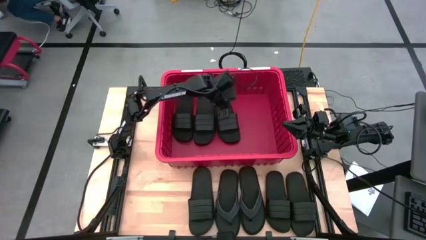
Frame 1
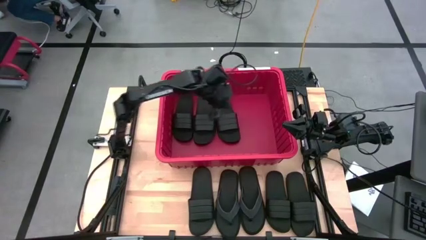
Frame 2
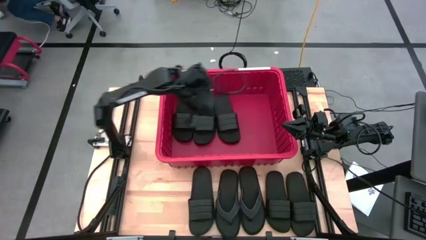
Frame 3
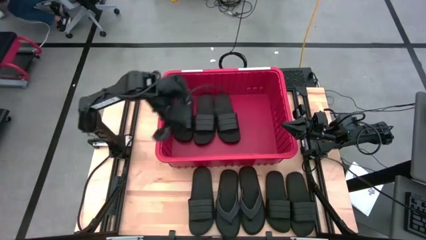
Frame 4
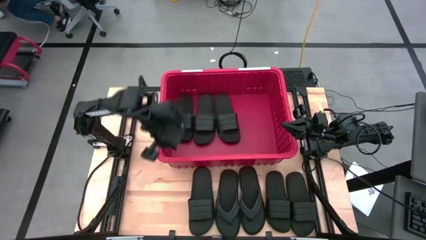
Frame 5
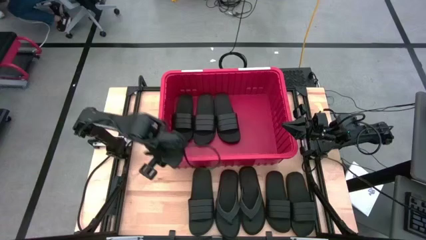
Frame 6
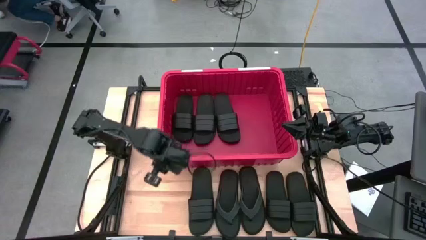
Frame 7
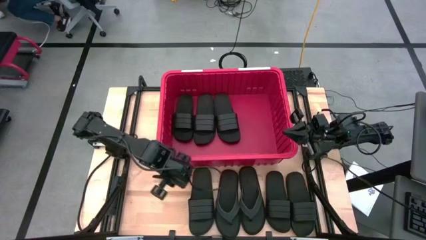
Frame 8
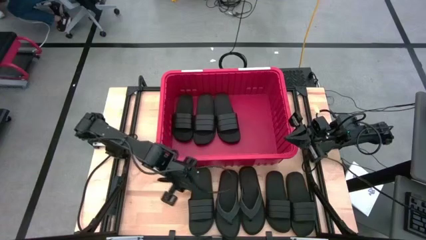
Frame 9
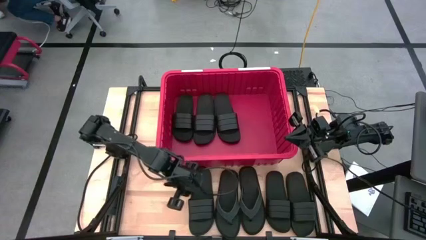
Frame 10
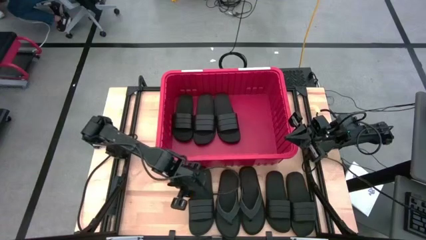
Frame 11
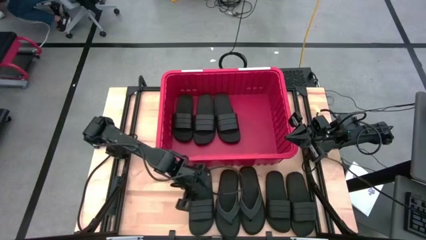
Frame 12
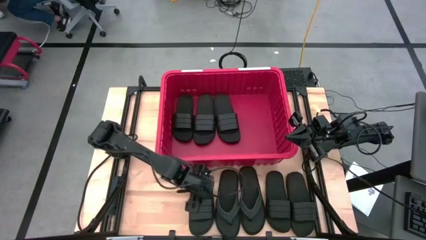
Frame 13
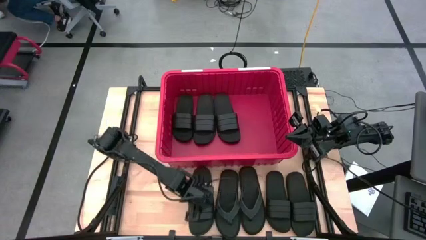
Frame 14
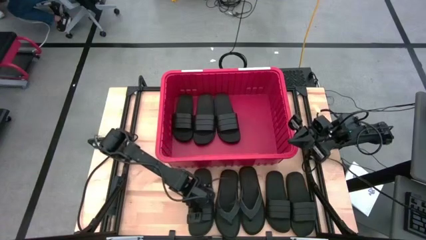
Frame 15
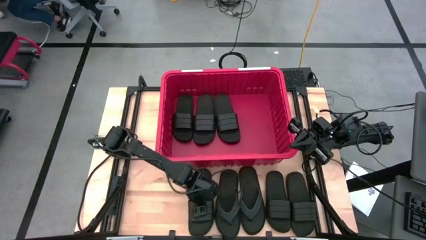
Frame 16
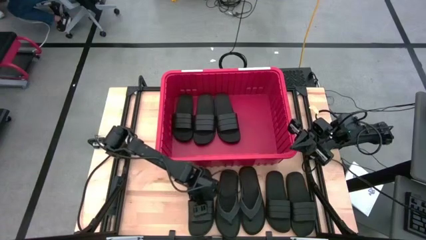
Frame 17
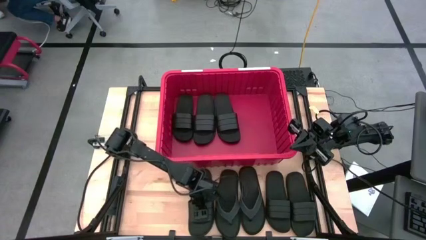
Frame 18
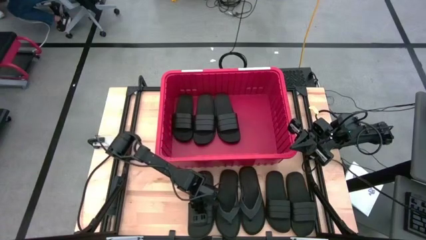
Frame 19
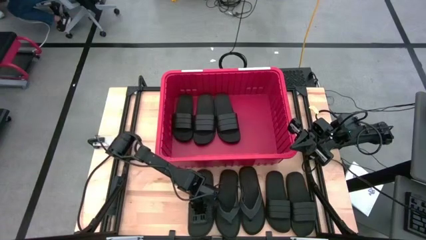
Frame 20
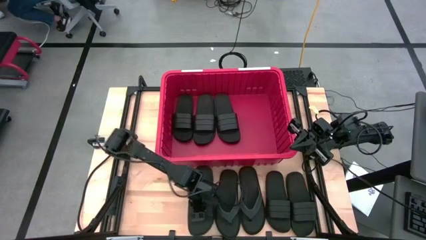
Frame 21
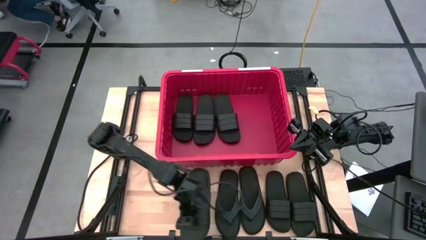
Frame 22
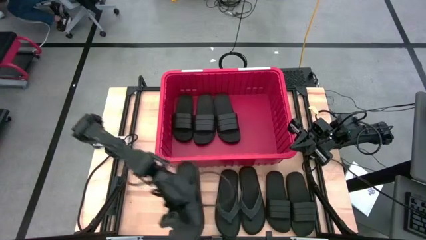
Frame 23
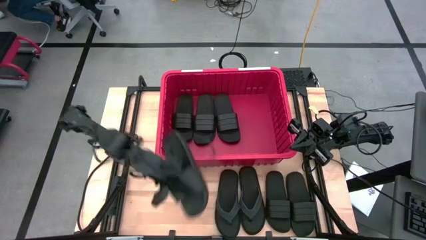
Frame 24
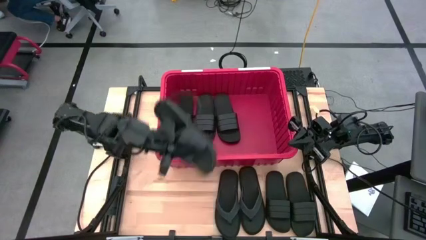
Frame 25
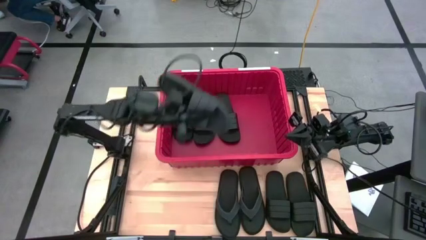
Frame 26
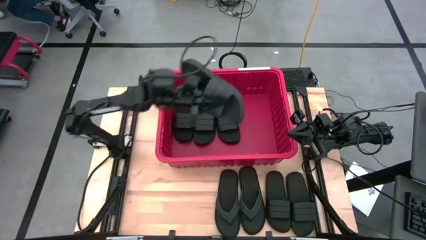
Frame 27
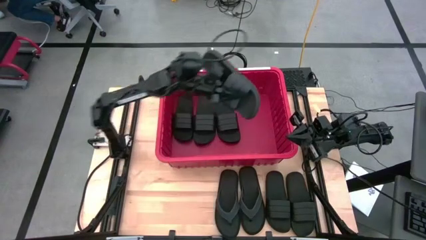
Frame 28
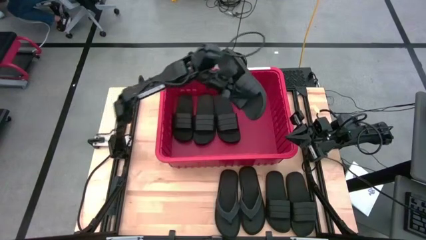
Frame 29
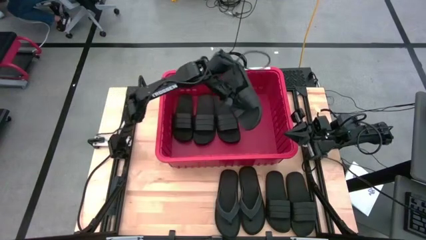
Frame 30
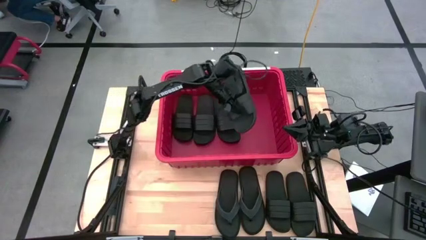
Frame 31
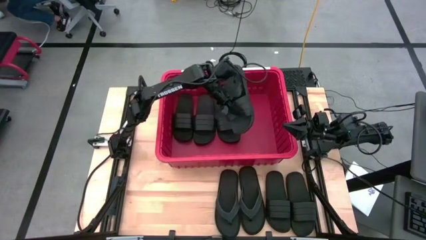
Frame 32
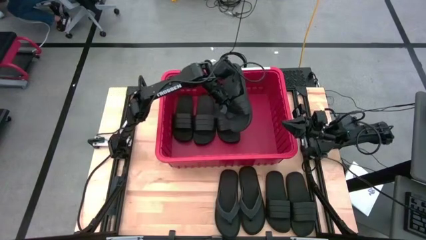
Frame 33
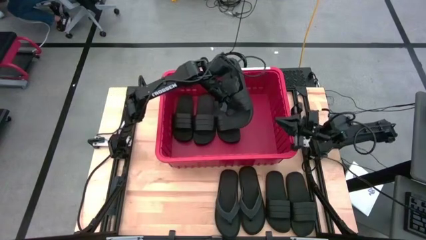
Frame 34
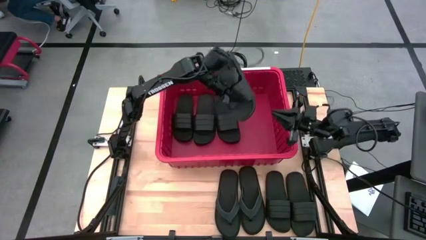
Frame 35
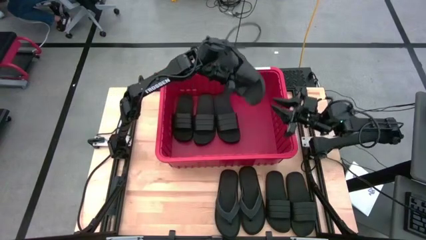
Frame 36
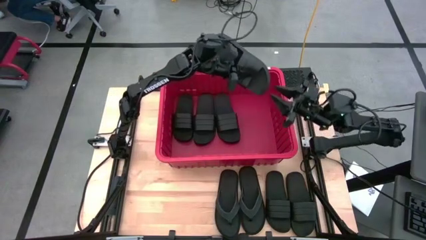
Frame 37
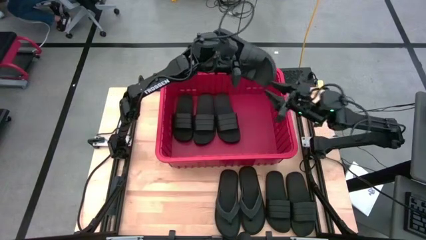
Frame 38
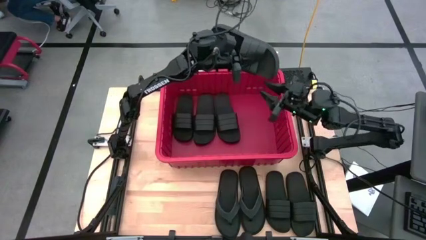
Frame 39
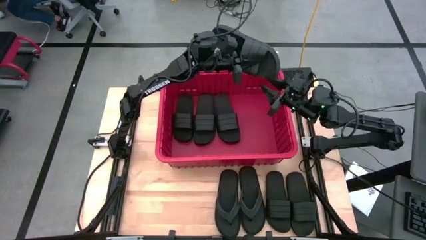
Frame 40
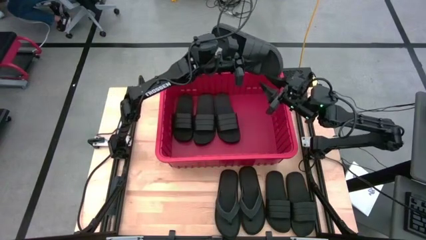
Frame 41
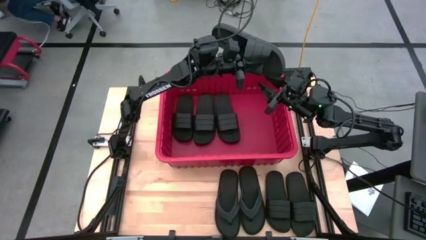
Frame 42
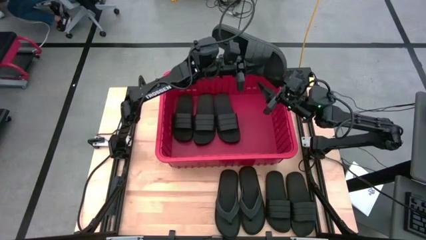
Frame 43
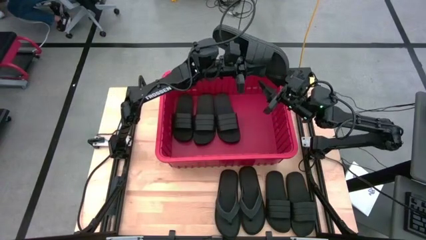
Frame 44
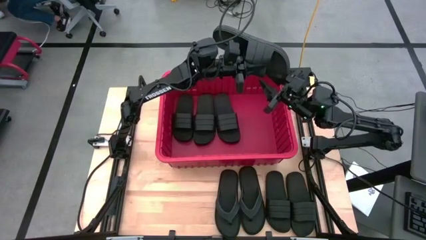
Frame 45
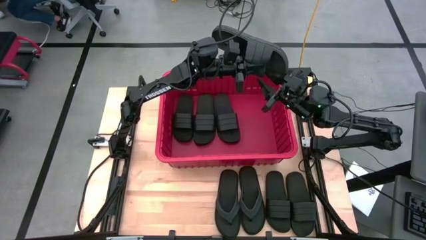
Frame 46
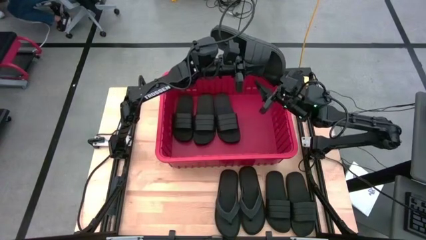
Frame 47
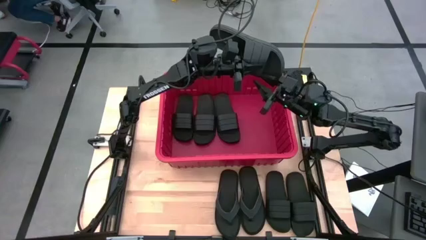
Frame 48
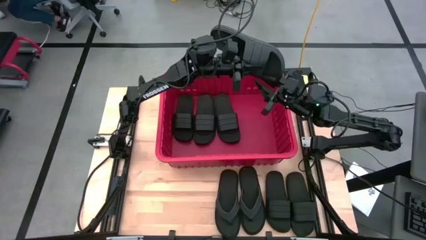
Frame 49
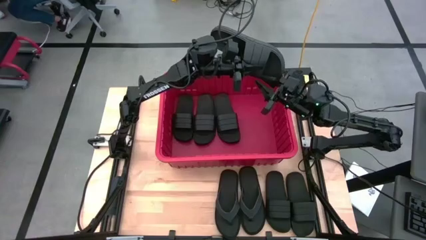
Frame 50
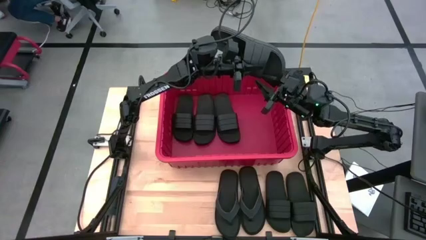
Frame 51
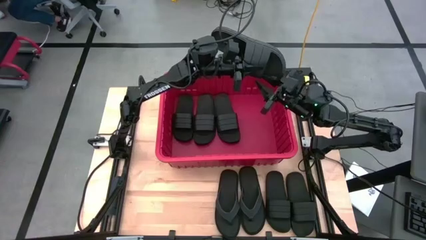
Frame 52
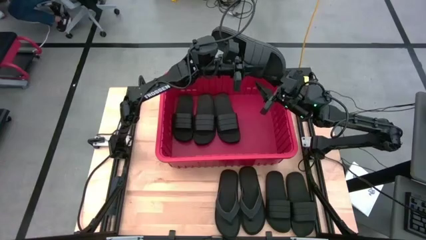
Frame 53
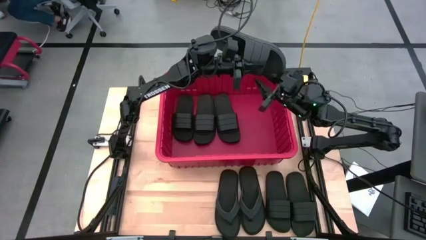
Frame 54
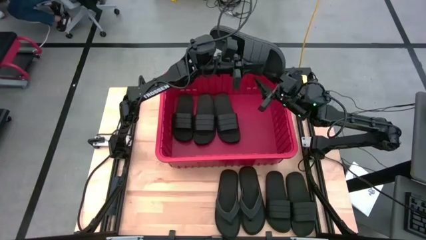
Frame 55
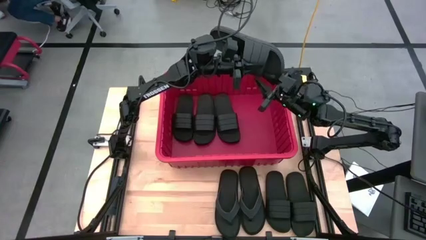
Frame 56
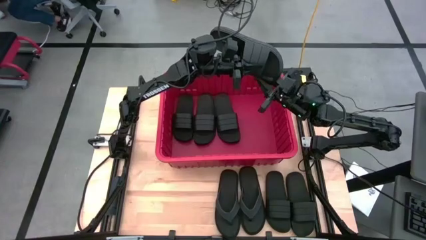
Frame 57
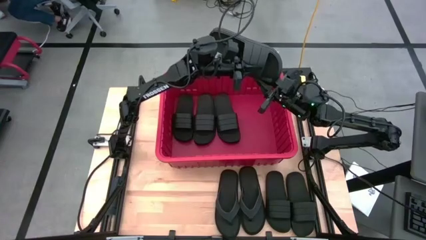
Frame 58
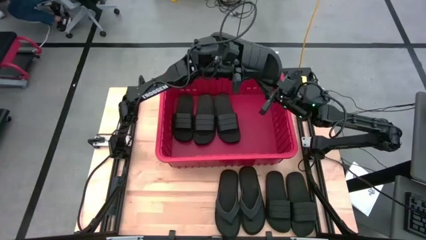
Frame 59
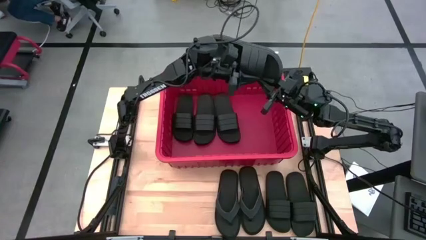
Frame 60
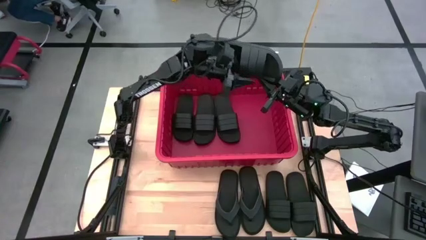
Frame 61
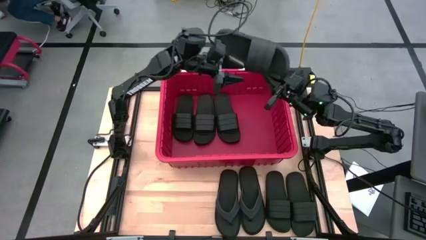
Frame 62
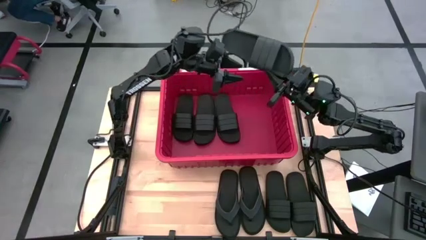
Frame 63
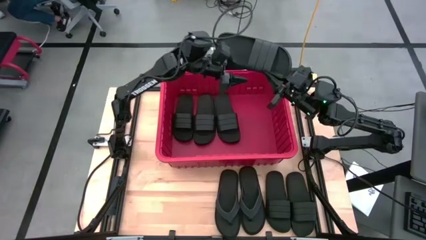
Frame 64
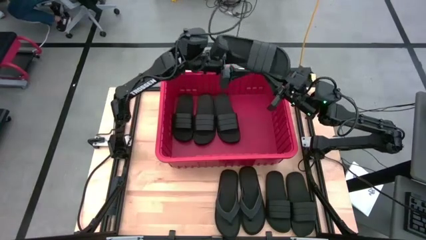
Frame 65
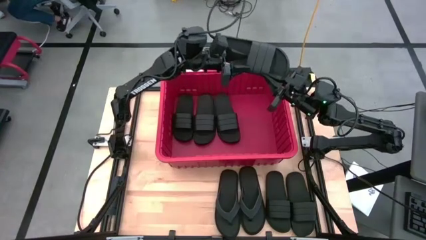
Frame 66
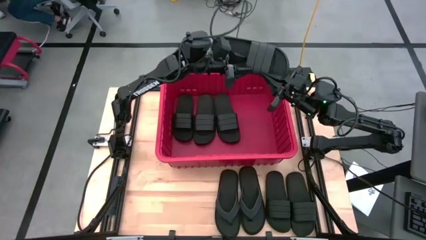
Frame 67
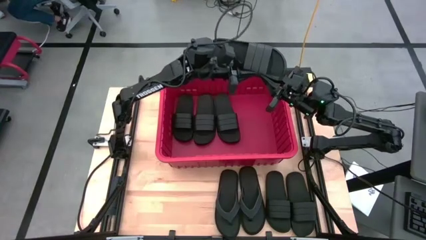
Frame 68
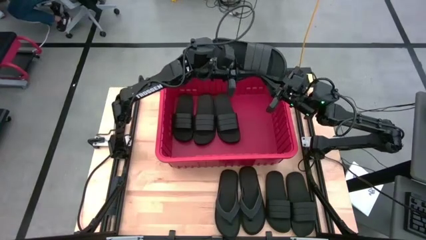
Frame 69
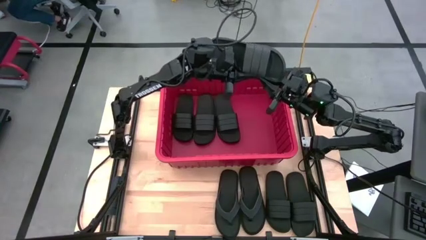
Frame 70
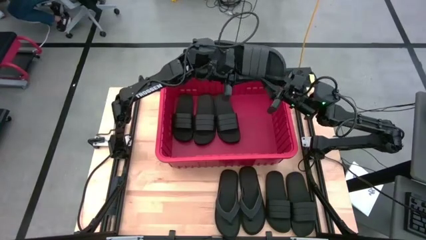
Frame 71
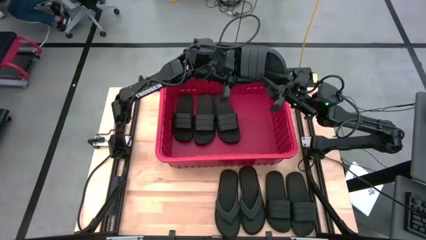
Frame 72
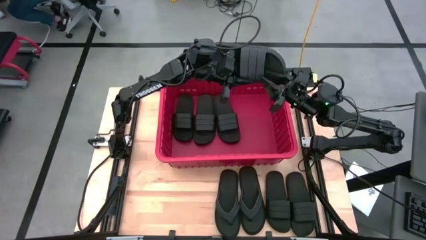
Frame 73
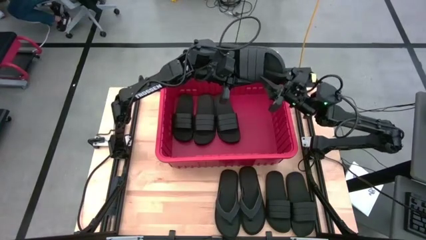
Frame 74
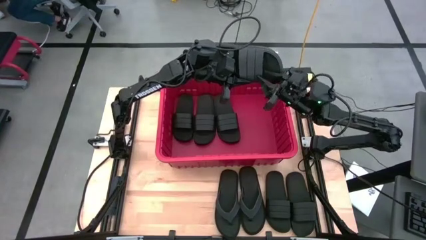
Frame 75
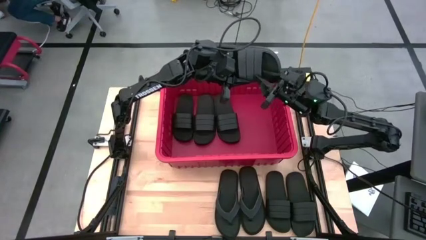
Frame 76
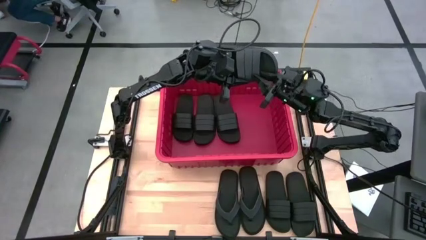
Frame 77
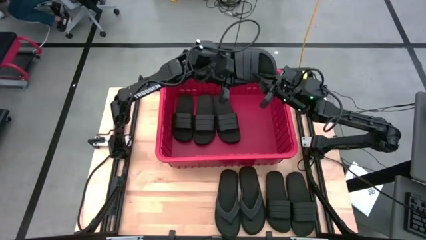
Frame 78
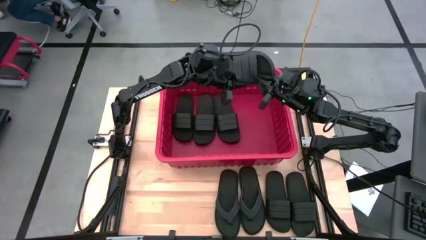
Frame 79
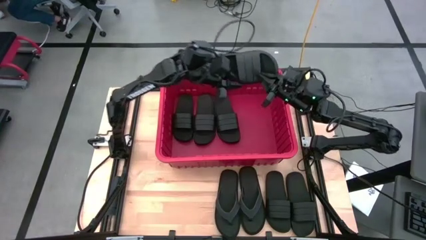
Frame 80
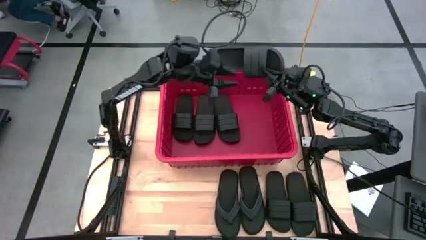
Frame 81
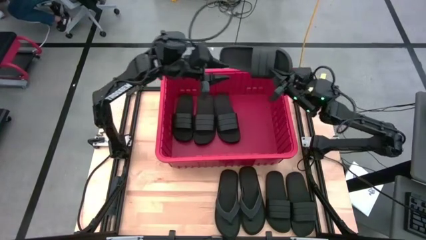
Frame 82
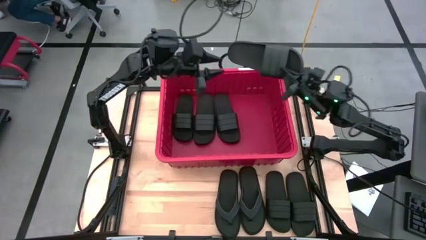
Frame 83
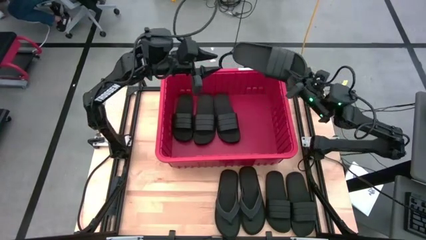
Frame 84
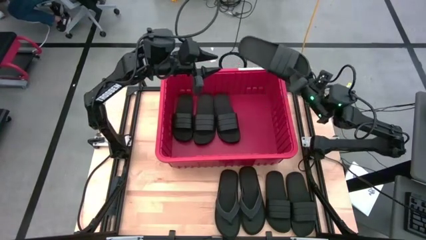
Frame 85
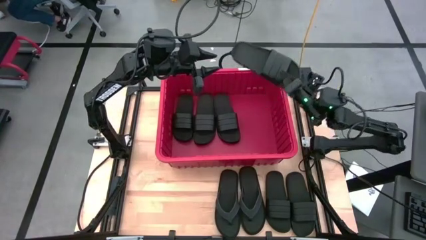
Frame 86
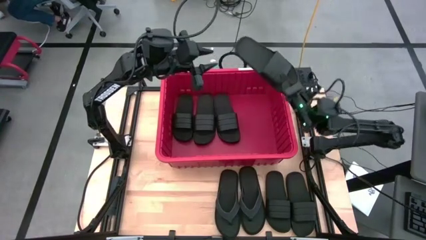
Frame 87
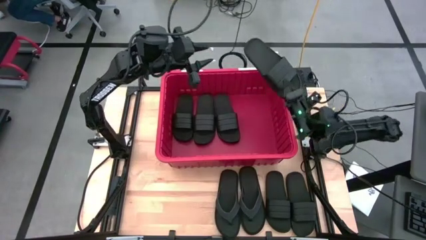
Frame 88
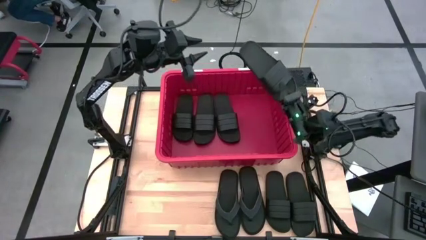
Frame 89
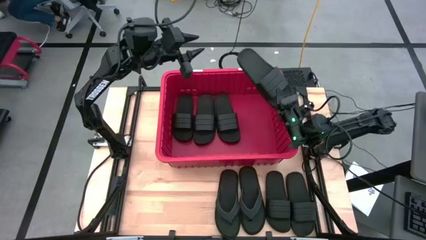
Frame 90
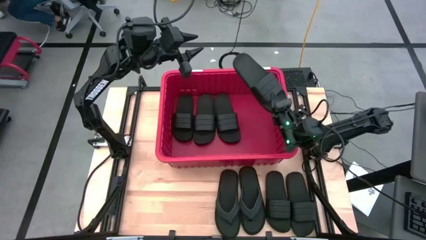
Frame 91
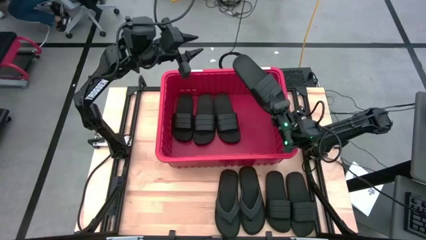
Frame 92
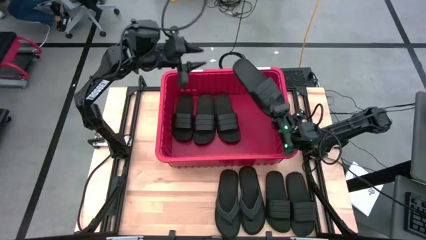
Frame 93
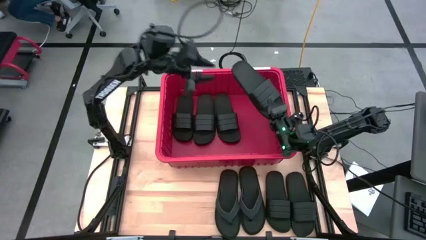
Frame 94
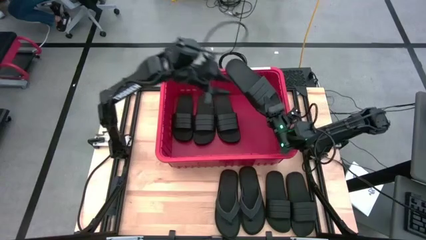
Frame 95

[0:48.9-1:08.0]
Task: Pick and place slides into bin
Put the black slides into the red bin
